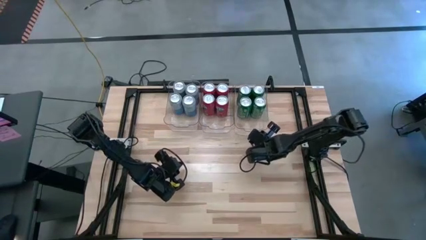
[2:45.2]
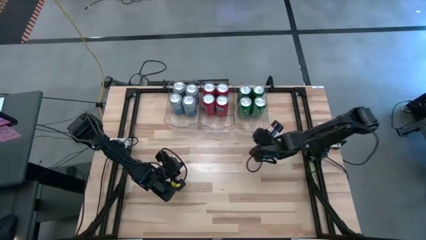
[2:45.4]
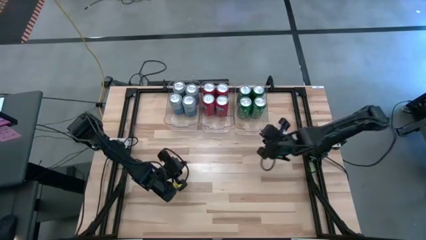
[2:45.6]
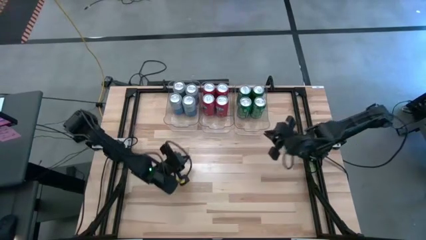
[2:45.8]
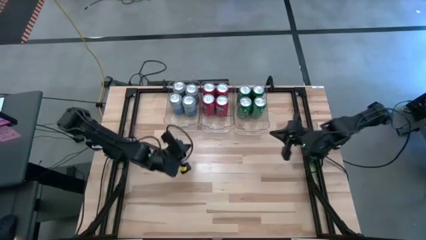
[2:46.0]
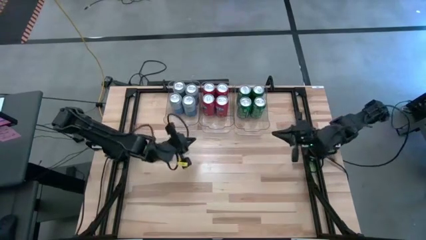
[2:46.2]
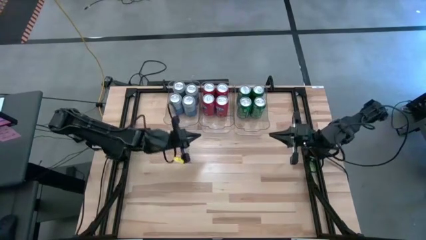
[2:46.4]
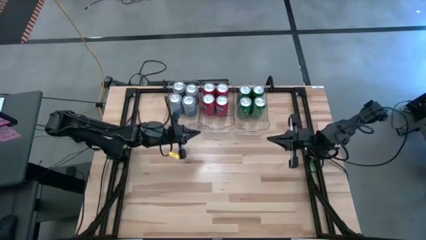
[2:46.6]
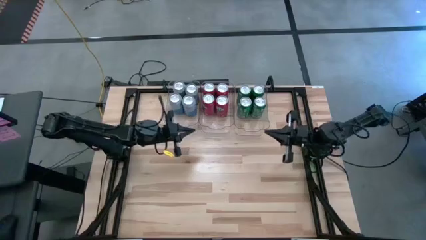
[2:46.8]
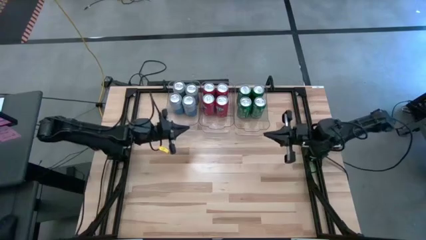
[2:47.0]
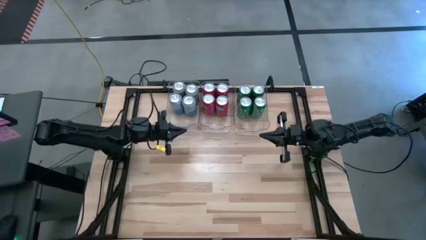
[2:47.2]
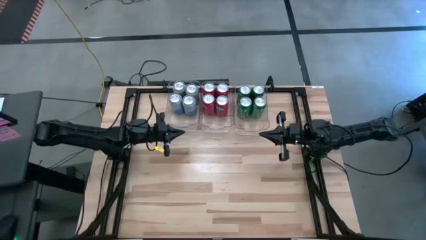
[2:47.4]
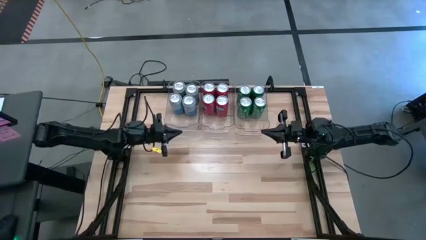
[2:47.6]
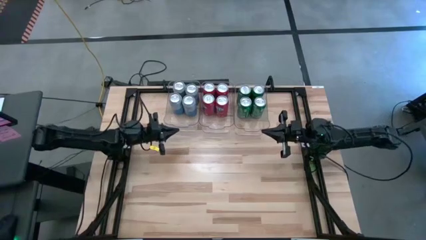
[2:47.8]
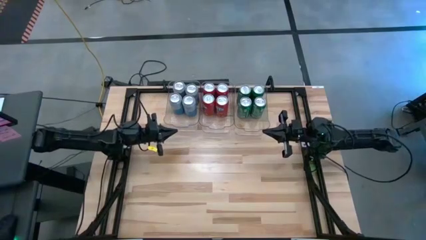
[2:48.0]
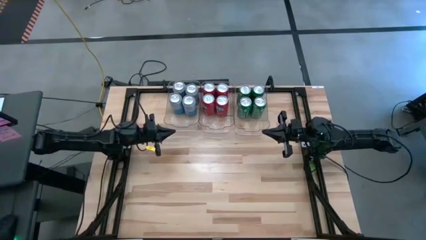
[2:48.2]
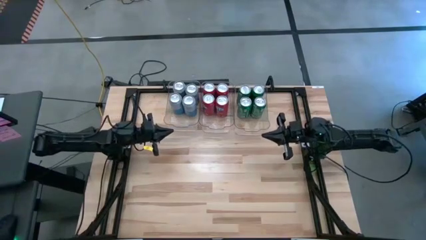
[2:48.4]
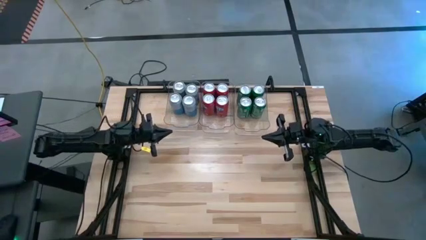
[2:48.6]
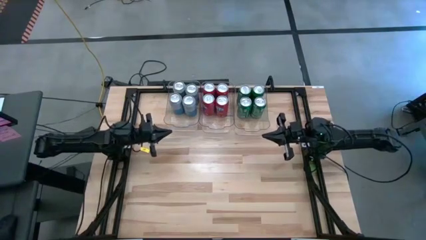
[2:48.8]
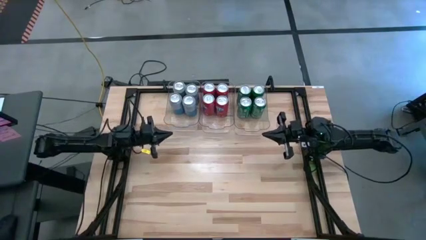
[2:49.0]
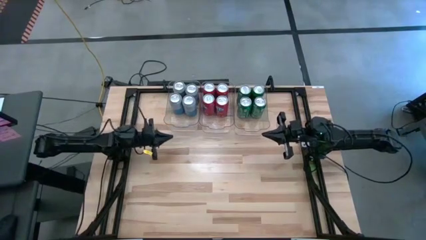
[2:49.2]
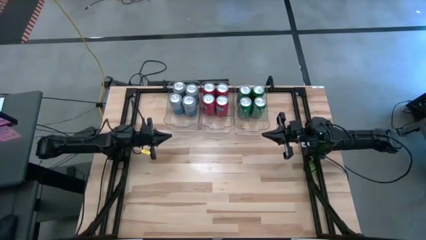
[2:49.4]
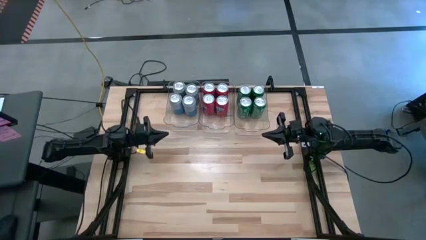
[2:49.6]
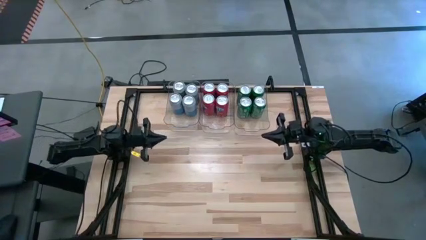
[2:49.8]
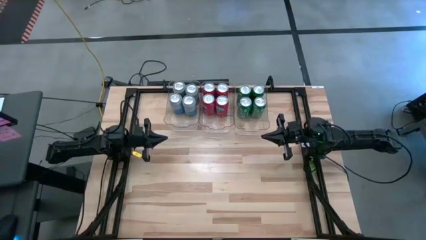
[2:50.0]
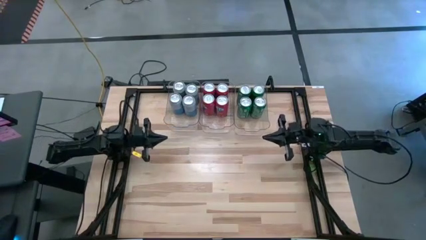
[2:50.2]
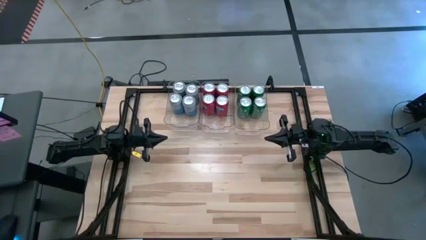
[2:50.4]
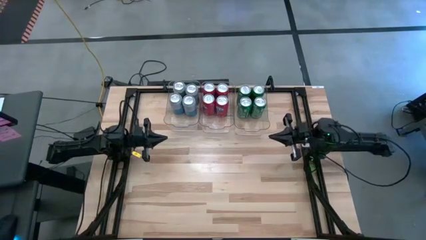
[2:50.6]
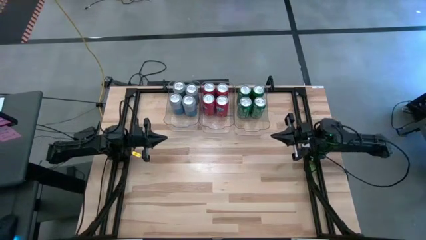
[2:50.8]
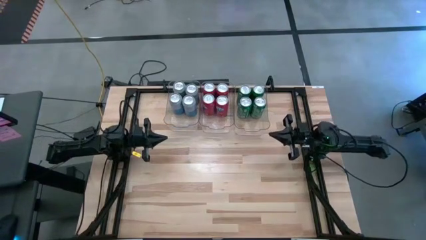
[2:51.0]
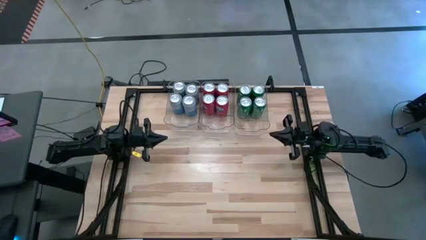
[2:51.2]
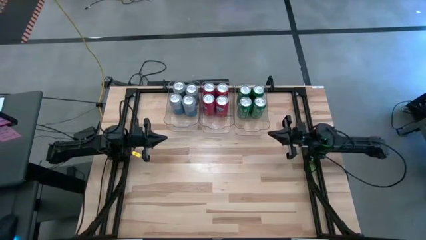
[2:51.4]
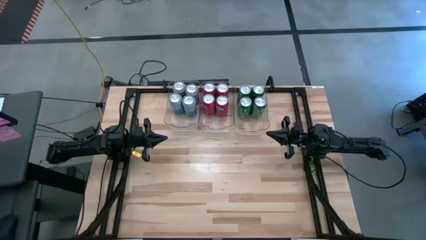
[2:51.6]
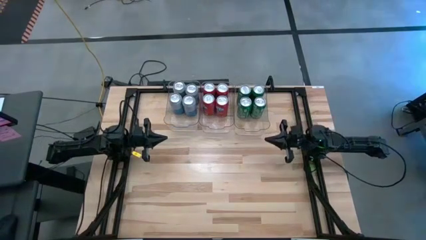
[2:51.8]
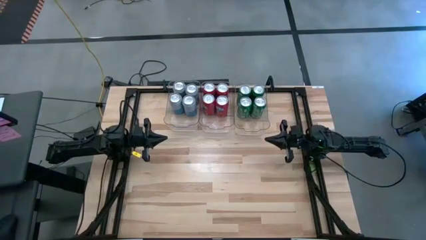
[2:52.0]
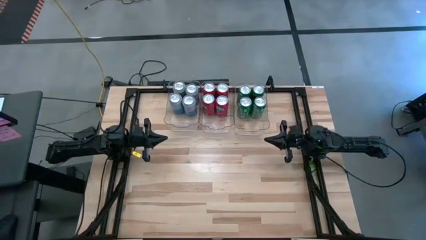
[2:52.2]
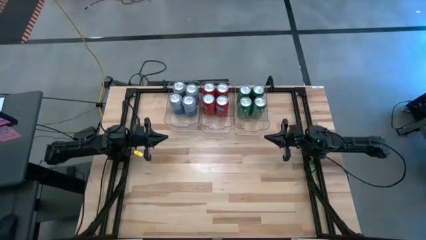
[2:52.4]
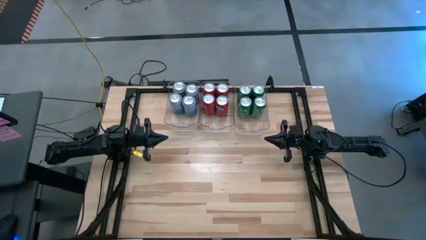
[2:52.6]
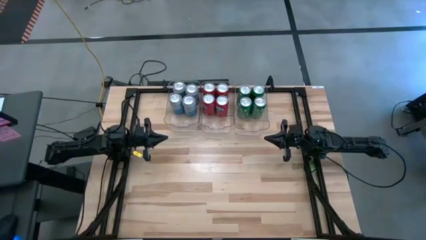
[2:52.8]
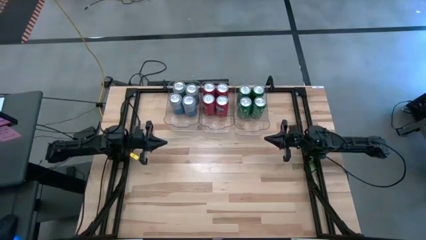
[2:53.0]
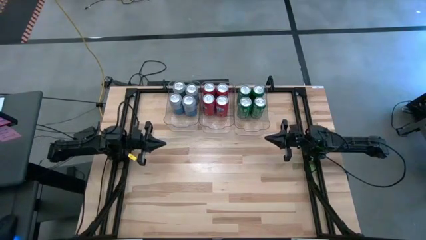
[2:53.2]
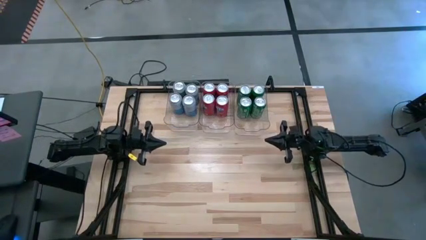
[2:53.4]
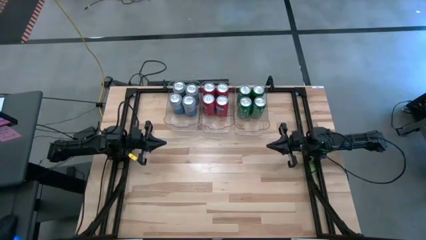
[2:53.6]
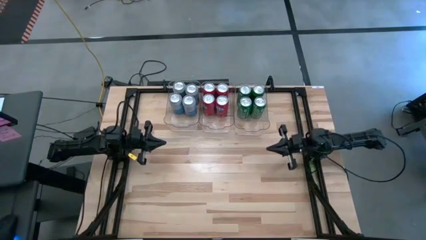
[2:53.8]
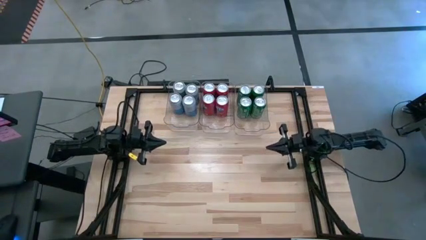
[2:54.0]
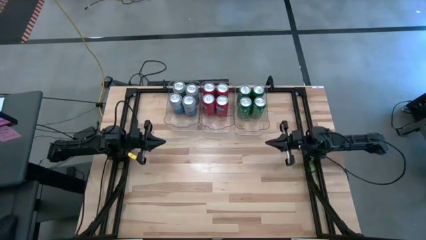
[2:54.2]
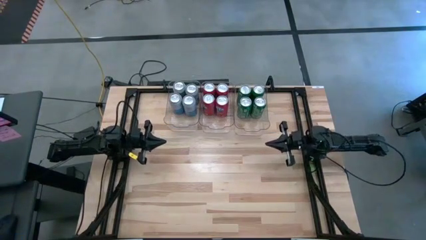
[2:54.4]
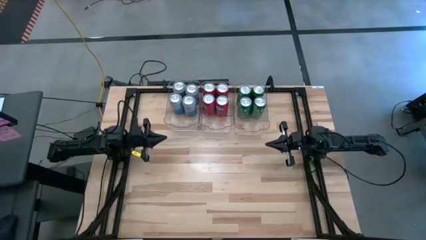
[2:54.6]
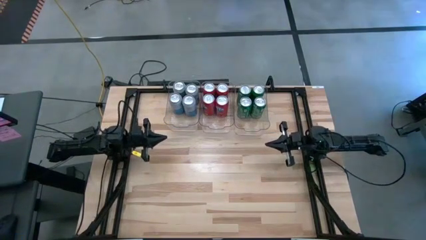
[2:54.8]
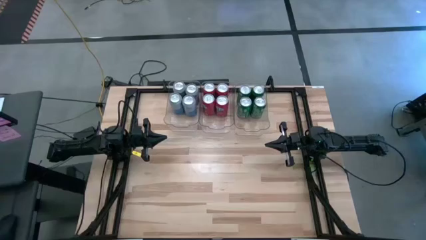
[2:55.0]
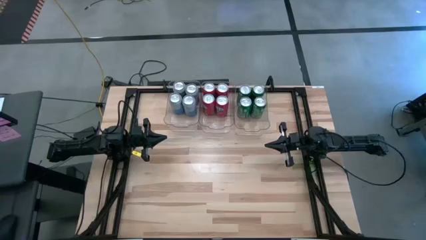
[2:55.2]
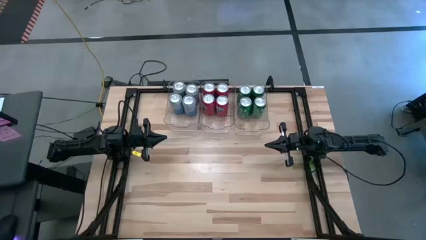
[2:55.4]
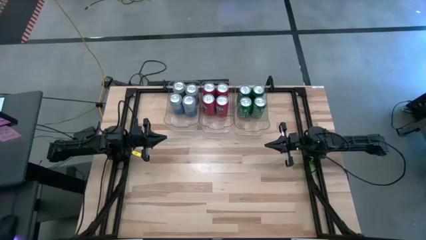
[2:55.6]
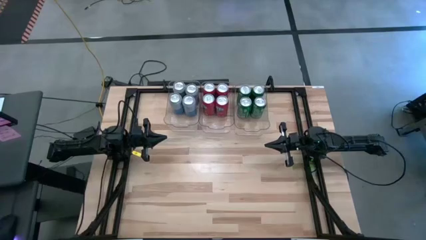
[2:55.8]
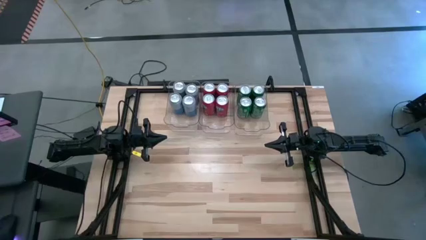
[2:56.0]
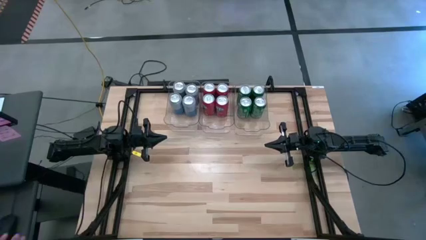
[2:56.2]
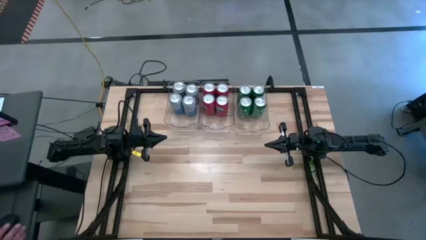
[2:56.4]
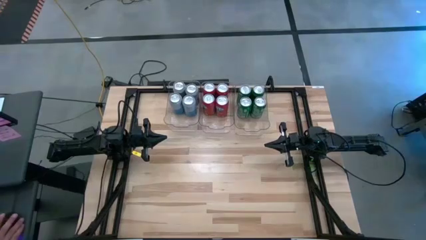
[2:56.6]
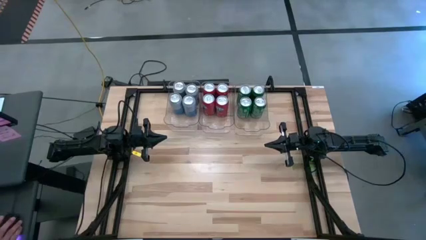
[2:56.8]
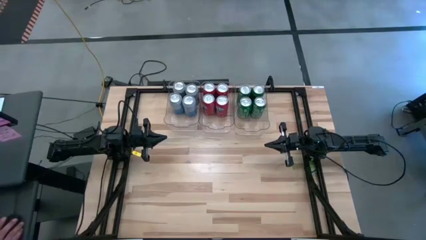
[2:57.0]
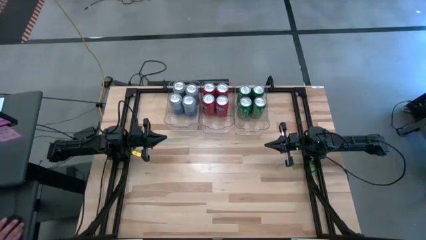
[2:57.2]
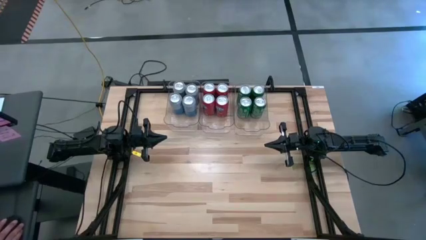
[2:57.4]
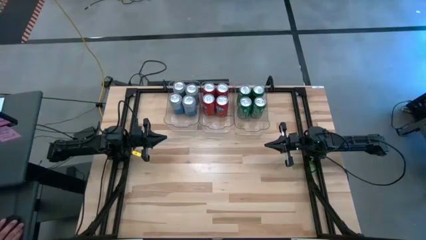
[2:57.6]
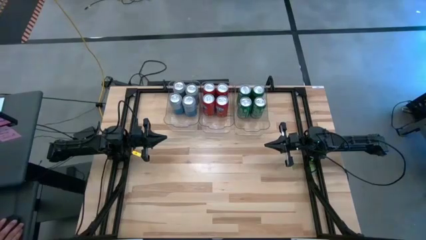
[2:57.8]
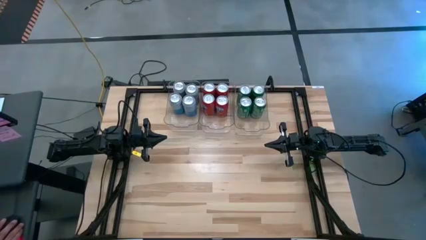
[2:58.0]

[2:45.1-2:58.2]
Task: Sort soda cans
Return to Home Position

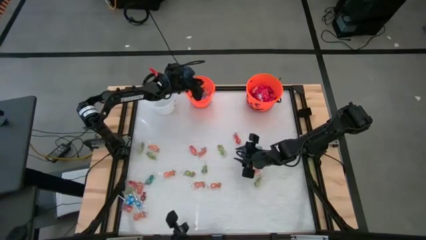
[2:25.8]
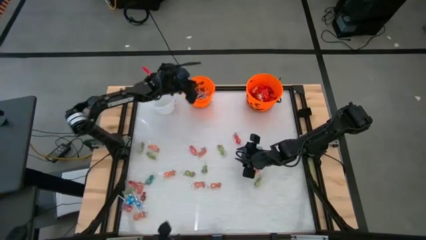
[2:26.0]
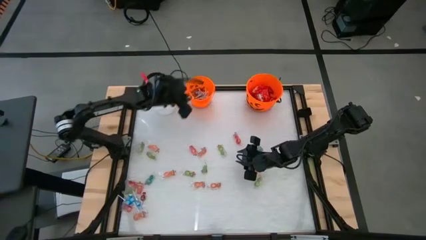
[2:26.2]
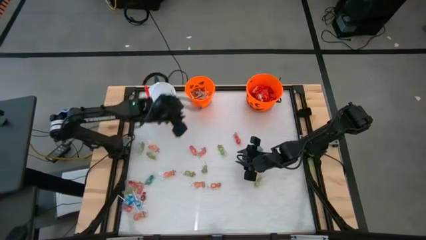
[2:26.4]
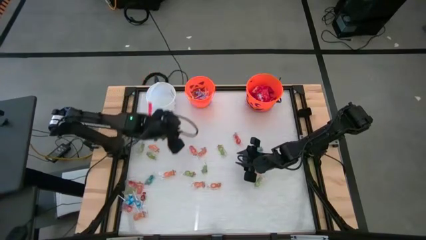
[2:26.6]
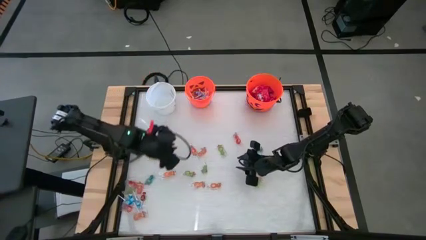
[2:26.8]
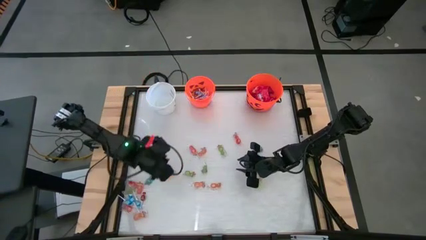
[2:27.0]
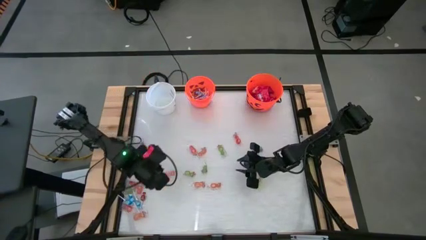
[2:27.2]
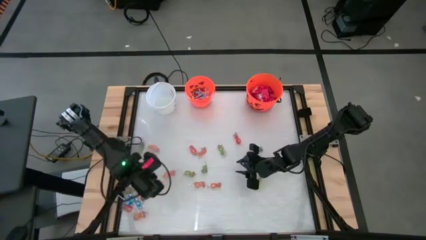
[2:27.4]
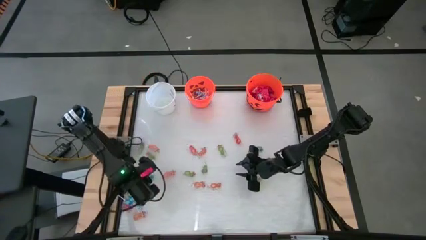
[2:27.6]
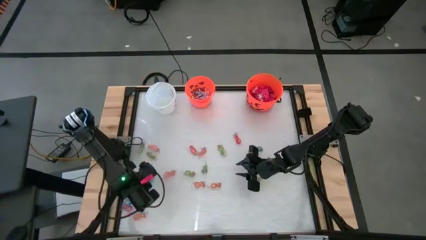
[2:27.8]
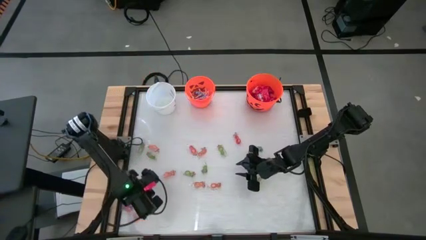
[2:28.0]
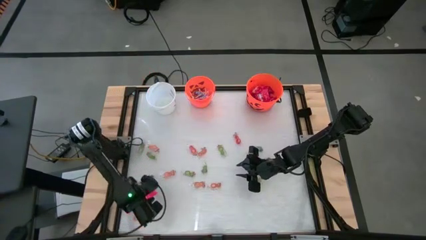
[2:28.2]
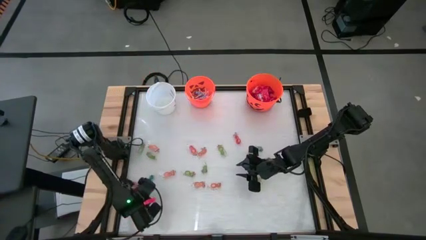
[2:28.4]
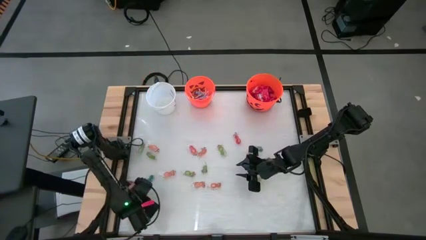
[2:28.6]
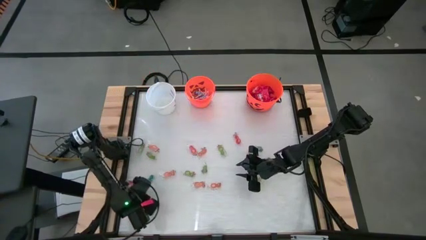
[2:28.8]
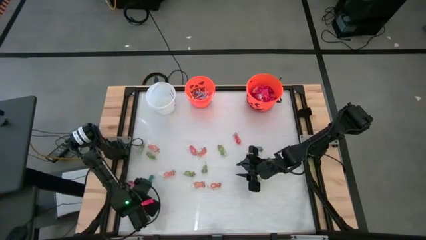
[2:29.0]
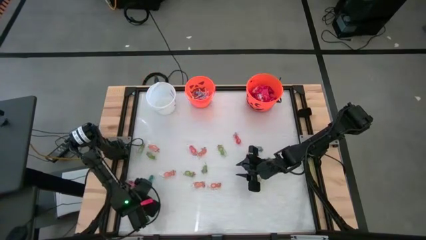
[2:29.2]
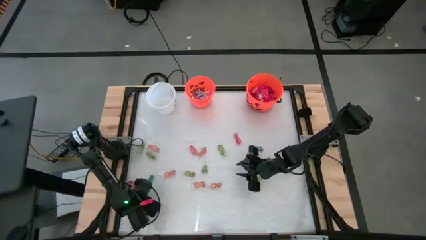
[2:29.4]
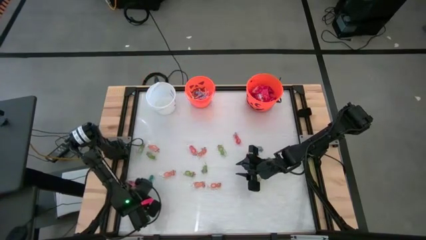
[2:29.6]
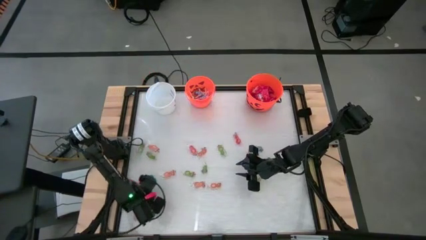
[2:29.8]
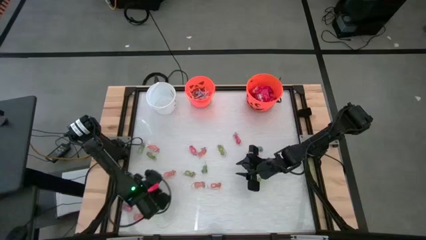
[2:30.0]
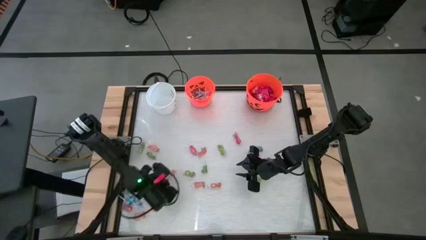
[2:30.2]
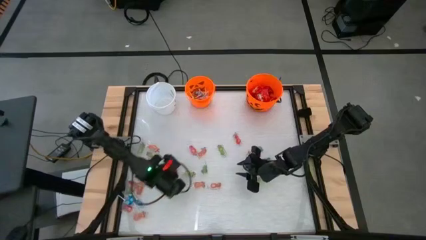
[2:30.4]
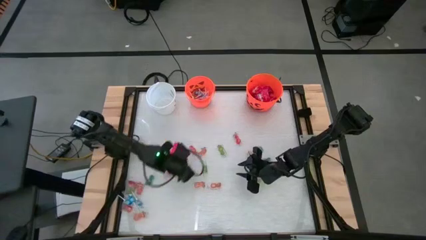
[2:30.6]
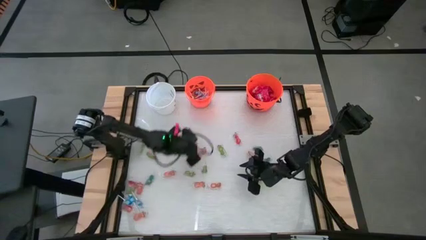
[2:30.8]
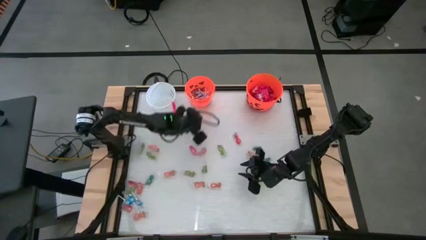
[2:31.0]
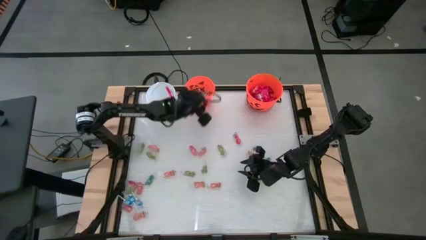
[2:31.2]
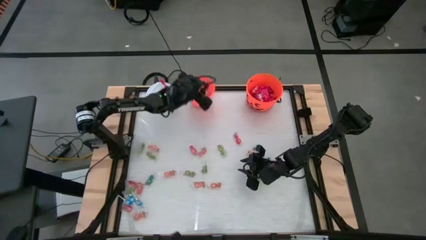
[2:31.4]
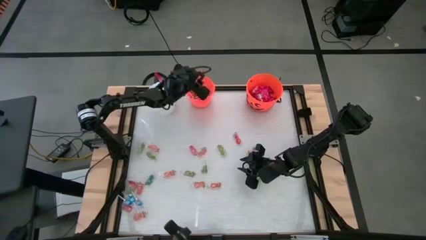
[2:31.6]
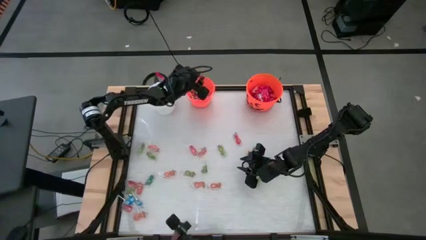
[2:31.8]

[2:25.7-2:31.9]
Task: Sort candy by brand, put in halloween buckets
Put the red lollipop into the left orange bucket
